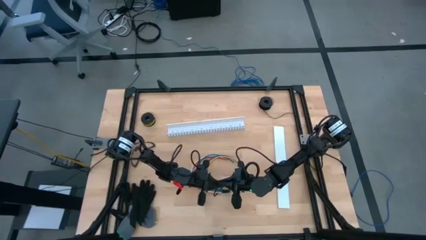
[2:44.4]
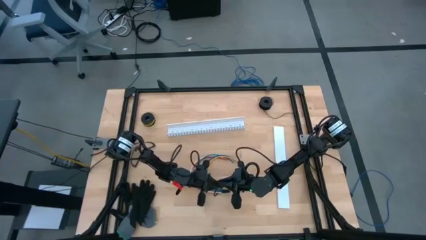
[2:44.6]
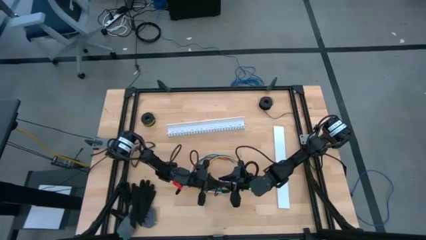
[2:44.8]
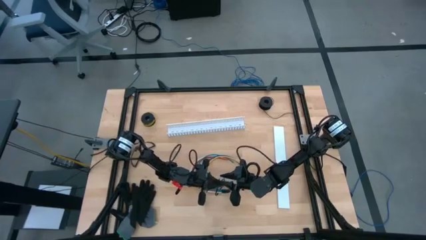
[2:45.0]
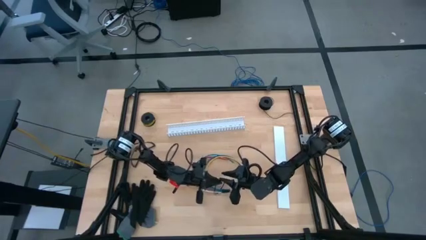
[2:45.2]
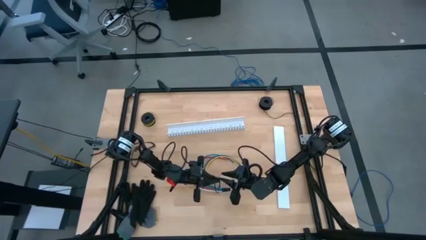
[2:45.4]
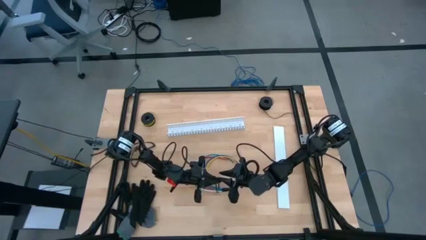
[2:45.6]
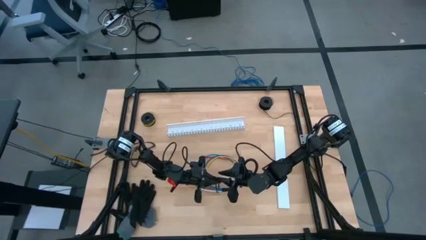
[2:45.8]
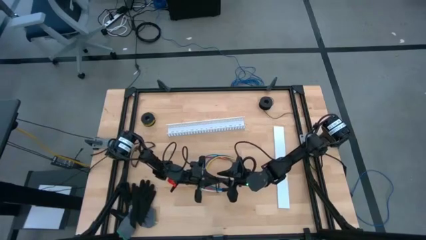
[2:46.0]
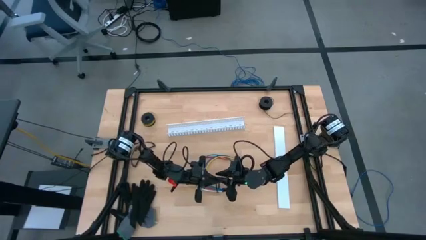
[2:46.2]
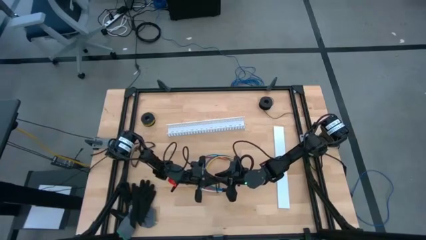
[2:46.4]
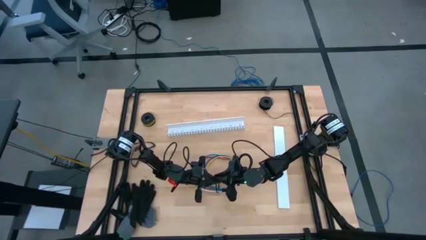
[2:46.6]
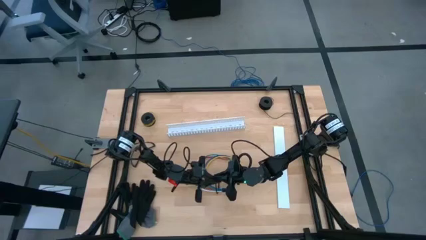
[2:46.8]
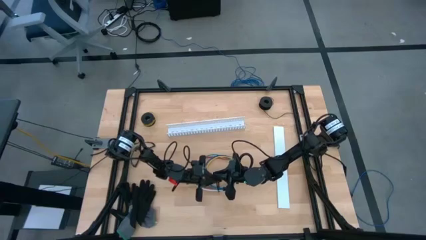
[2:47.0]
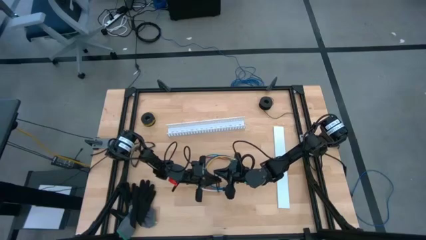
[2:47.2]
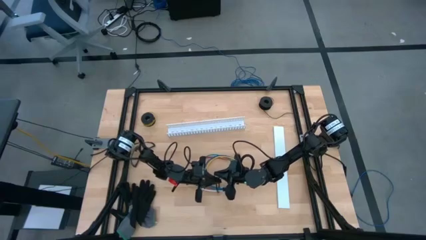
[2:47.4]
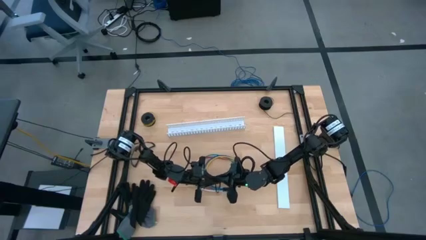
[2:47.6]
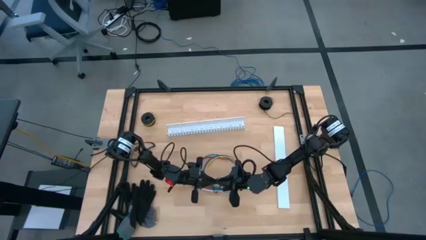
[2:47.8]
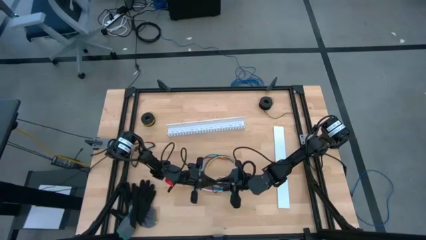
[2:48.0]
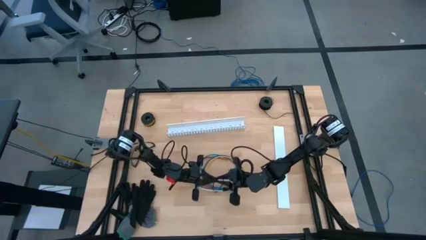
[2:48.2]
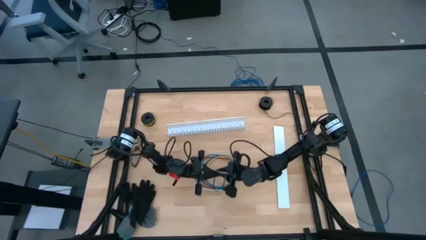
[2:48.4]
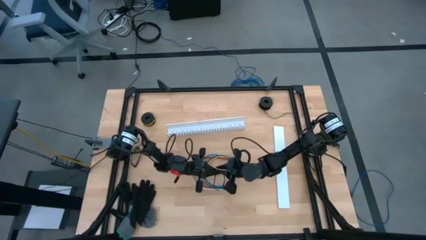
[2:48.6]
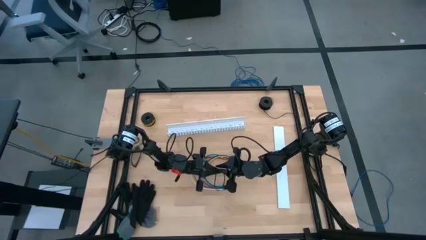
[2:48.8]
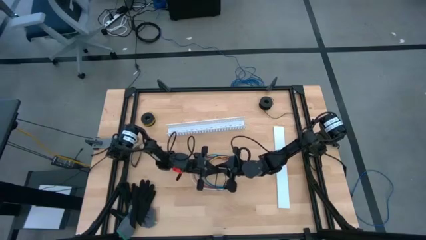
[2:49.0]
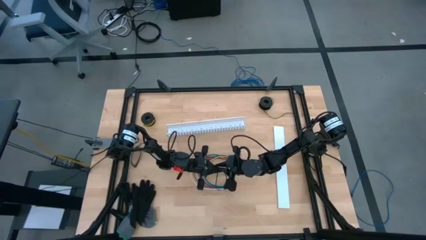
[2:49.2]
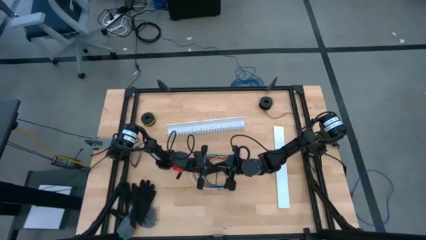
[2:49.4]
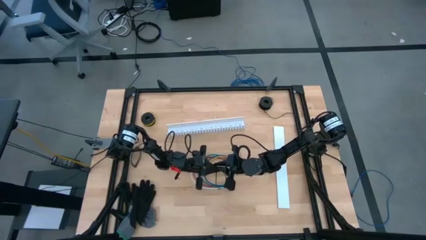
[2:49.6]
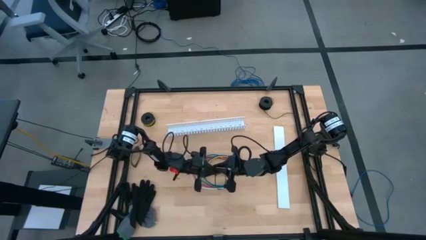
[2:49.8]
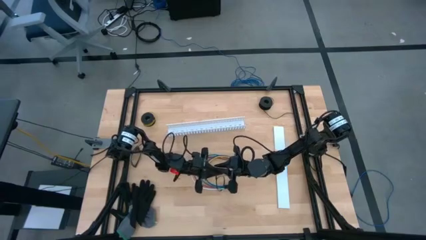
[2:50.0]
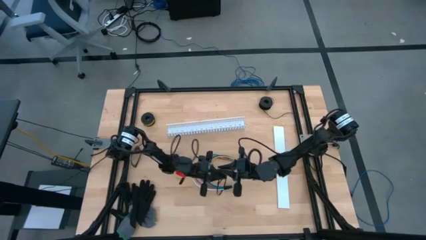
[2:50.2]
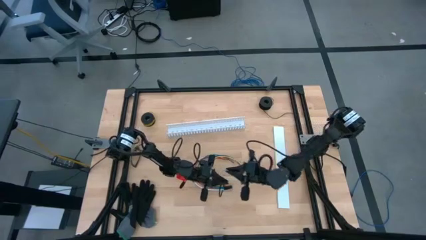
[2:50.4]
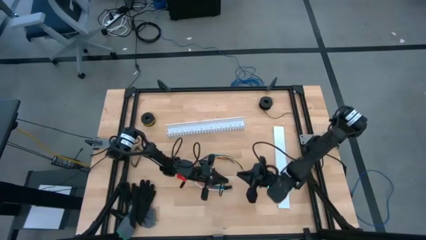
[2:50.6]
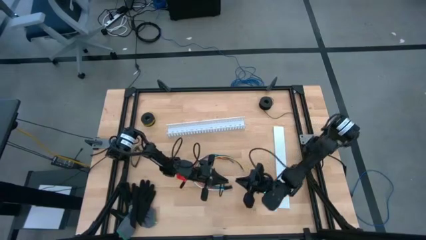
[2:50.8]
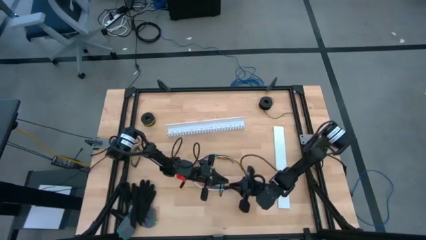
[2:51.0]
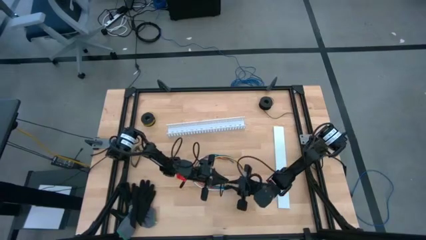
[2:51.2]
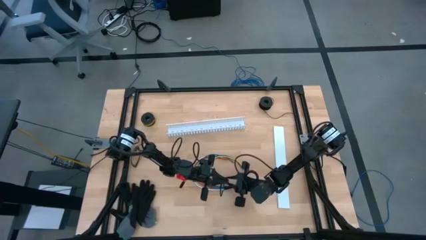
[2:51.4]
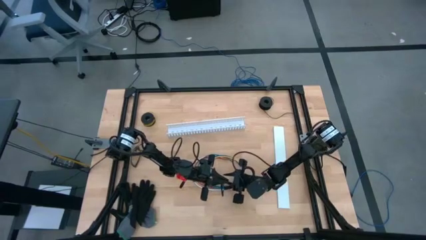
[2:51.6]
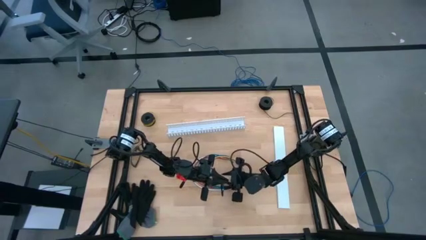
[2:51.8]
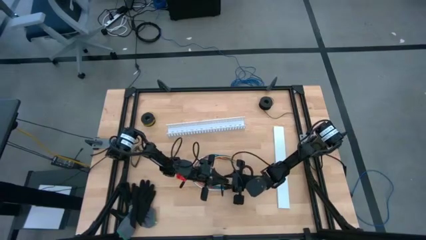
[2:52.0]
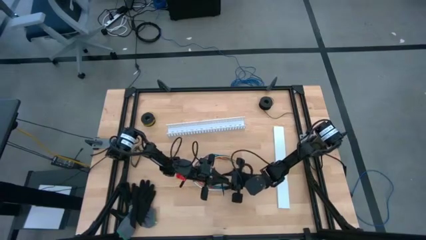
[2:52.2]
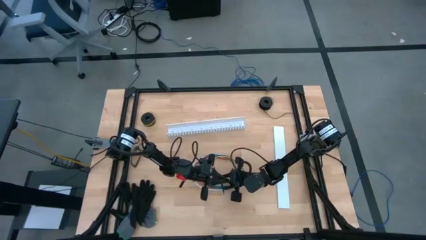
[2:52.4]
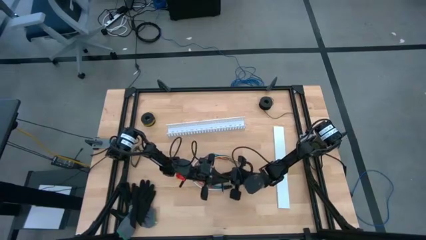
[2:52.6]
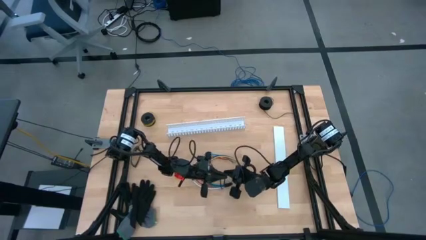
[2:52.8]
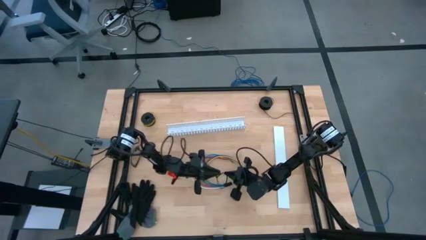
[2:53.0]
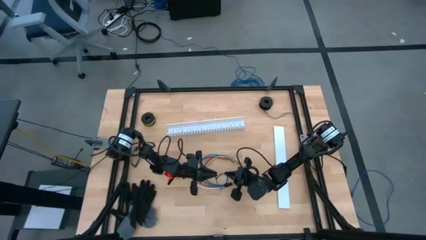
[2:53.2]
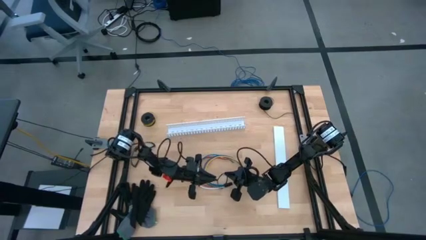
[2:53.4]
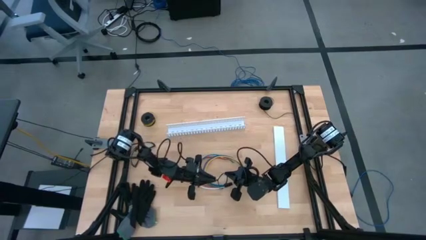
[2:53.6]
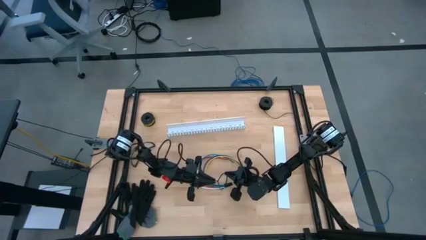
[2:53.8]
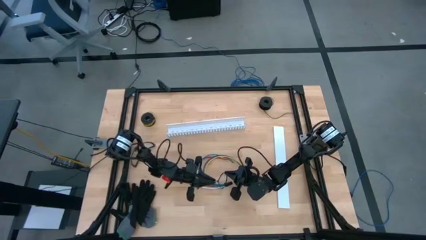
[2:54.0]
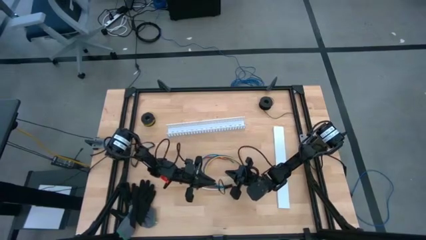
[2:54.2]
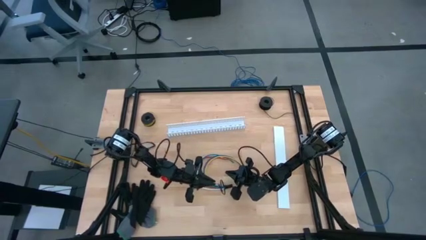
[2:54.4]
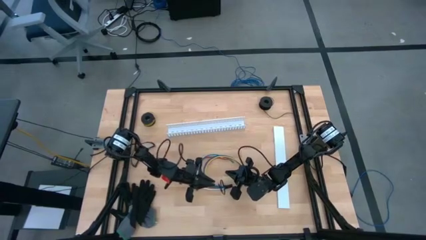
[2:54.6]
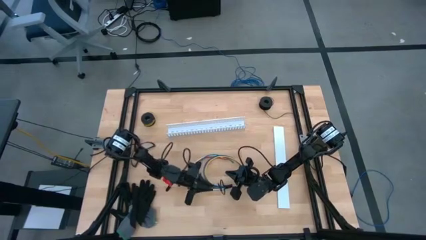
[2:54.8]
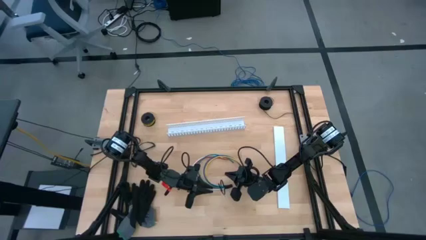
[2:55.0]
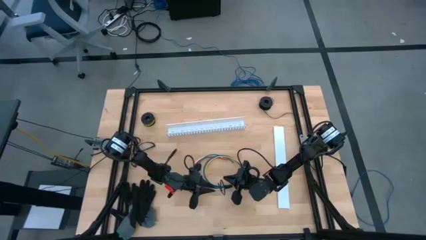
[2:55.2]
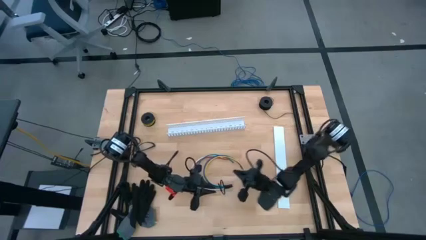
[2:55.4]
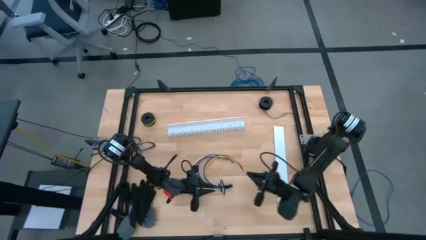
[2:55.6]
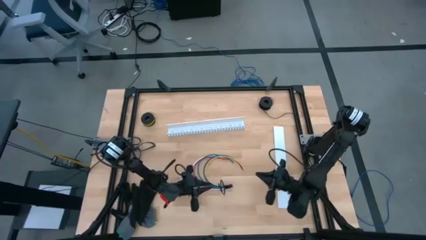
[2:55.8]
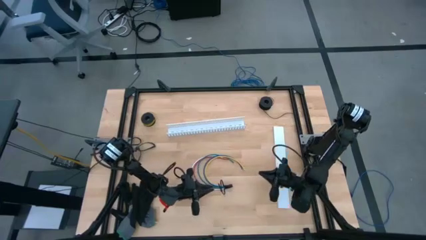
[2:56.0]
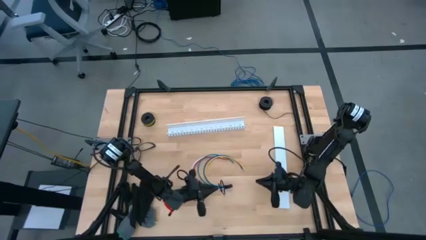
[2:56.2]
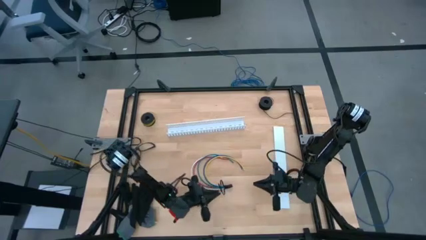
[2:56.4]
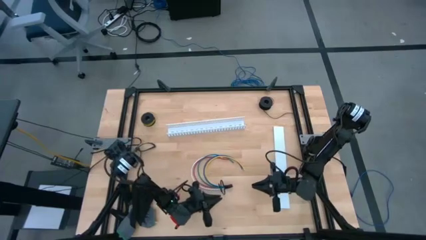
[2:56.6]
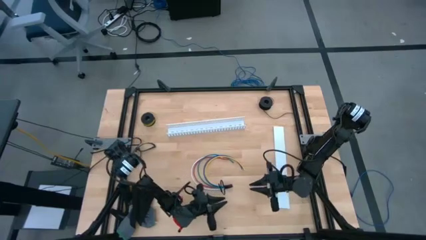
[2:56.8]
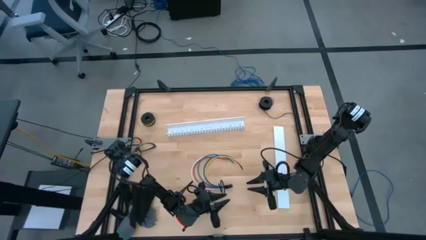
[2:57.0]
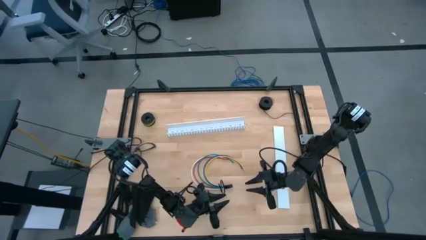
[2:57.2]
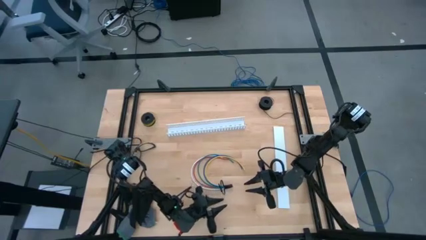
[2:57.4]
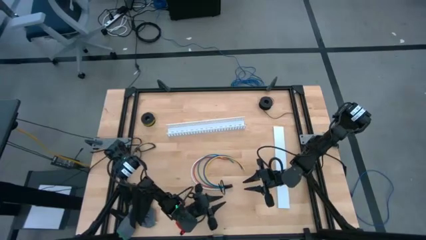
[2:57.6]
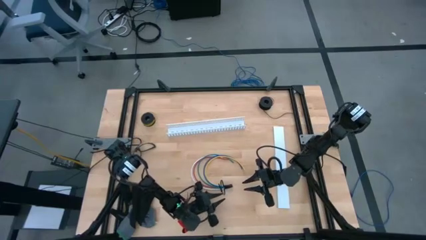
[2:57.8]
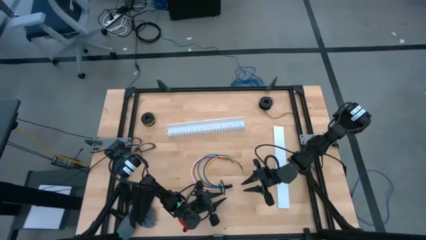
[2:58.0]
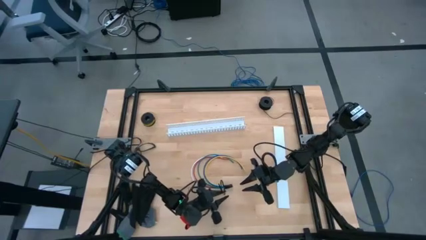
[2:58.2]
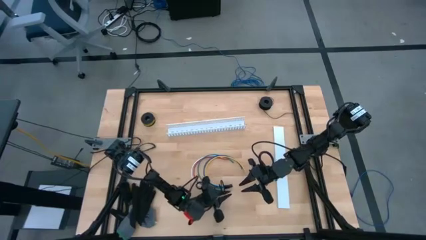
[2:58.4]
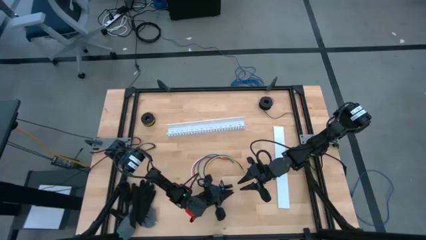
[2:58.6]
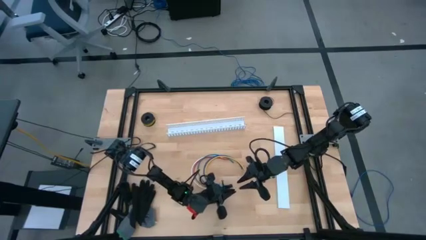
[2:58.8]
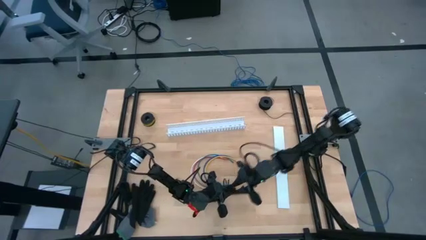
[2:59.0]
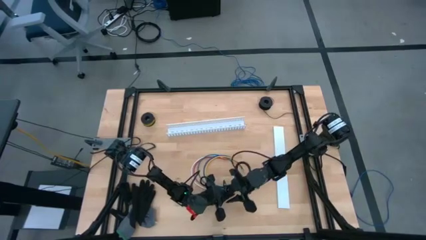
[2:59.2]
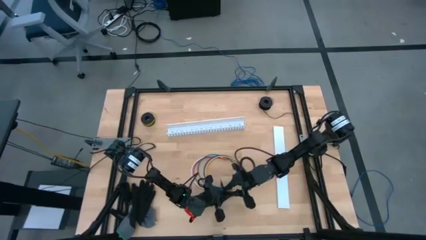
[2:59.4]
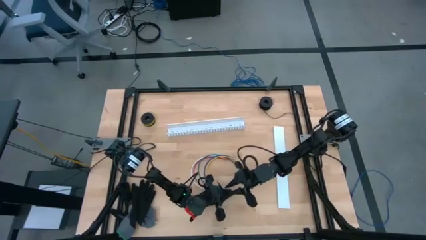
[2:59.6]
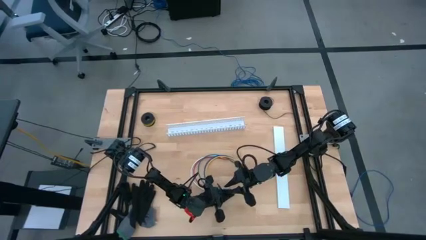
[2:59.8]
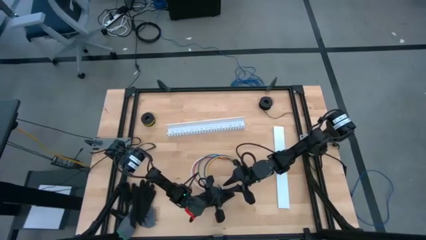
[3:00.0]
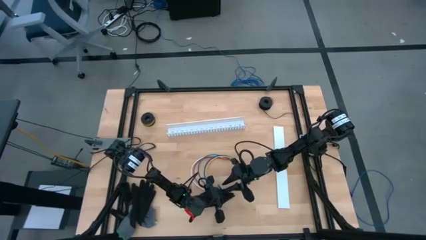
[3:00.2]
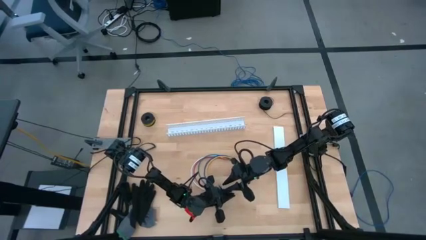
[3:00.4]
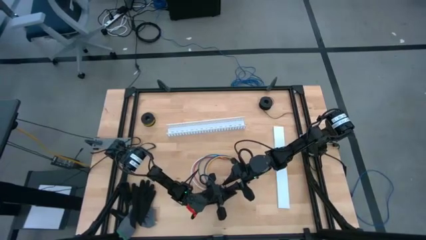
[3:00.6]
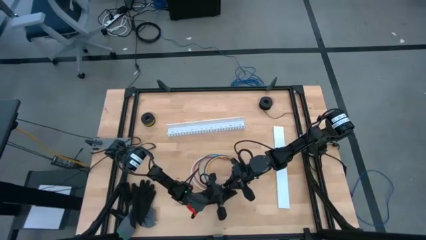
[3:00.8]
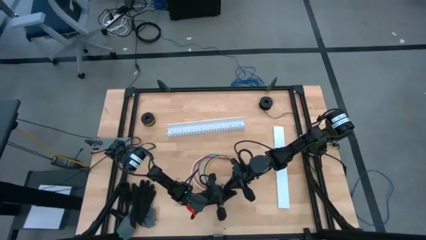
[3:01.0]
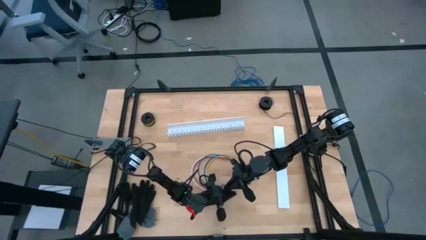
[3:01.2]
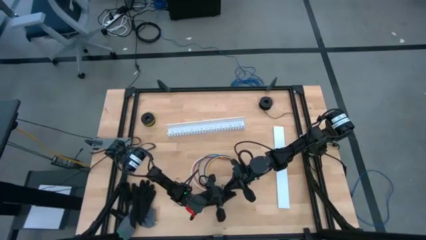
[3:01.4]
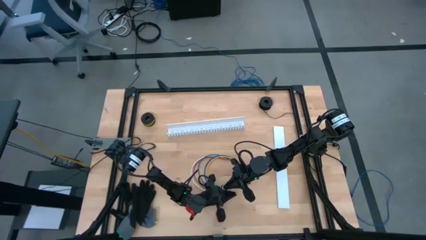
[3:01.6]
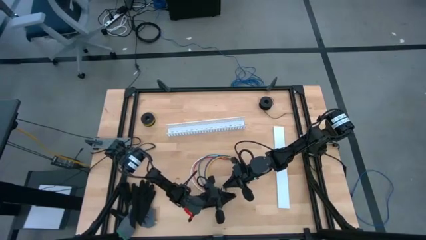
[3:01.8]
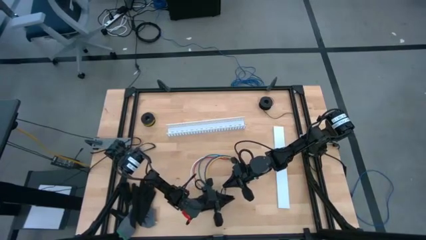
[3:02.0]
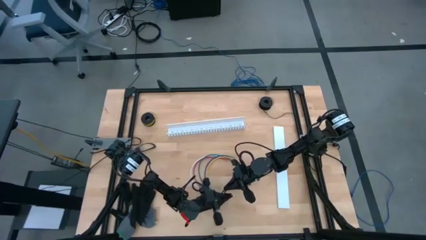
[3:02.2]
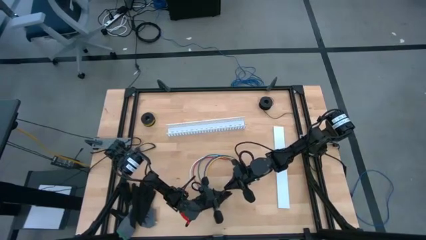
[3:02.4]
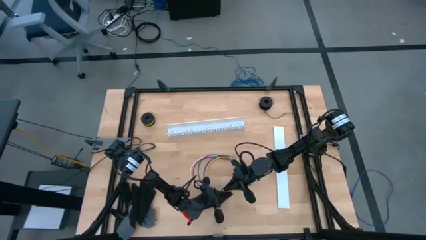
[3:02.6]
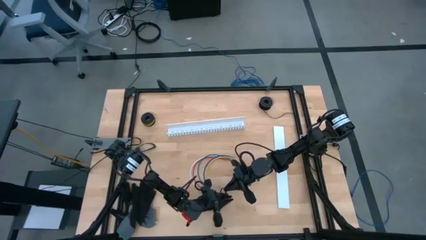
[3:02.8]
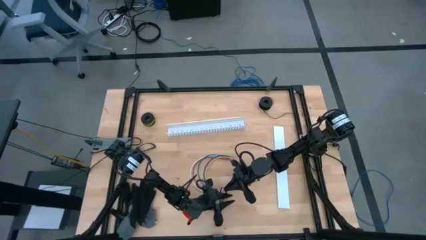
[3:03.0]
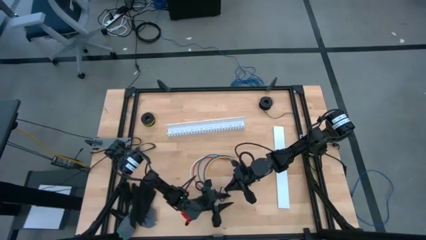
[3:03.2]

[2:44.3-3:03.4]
Task: Ziptie cables
Insert zip tie on the cable wire
